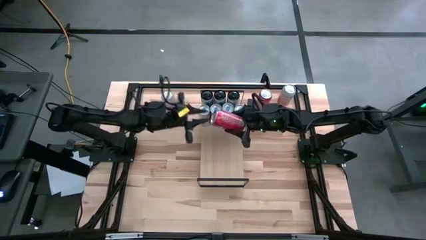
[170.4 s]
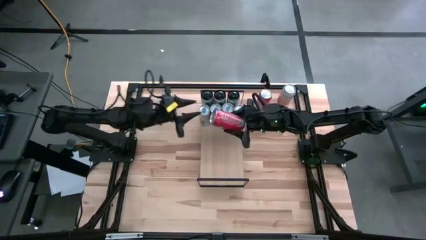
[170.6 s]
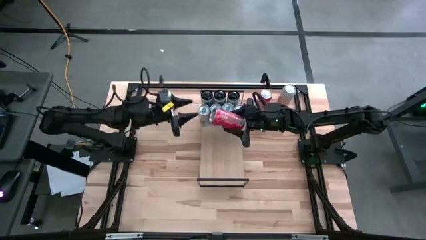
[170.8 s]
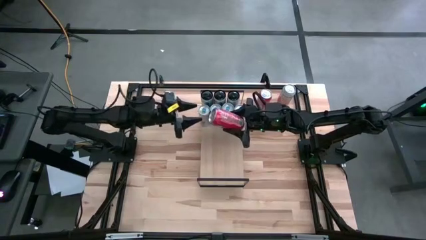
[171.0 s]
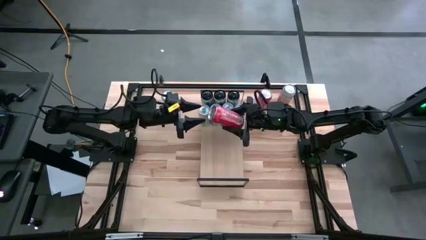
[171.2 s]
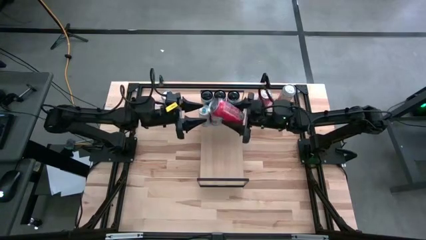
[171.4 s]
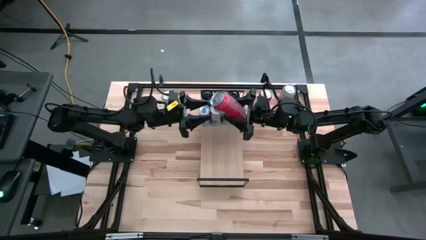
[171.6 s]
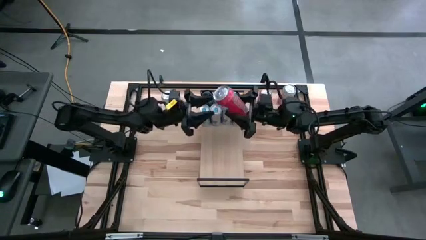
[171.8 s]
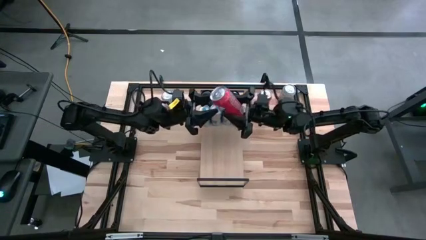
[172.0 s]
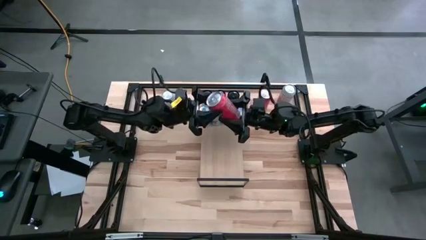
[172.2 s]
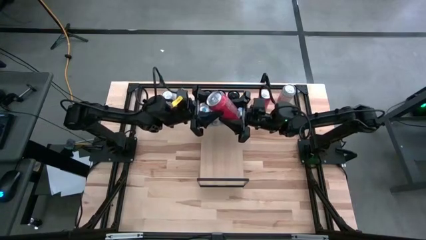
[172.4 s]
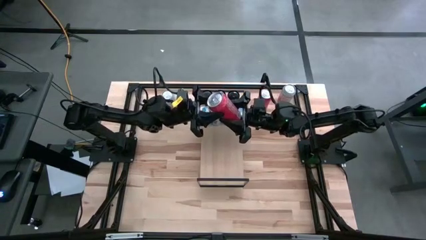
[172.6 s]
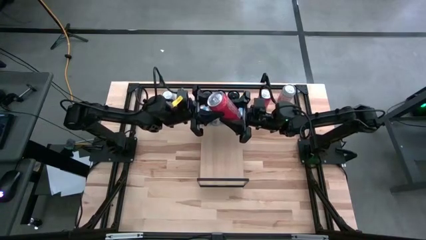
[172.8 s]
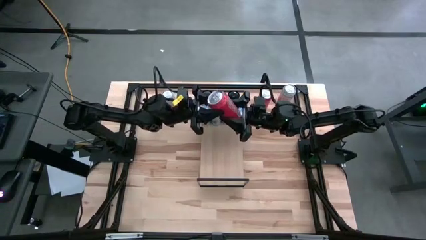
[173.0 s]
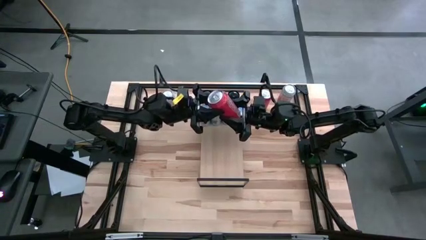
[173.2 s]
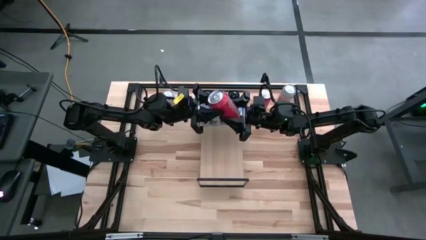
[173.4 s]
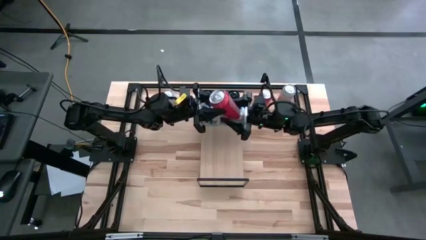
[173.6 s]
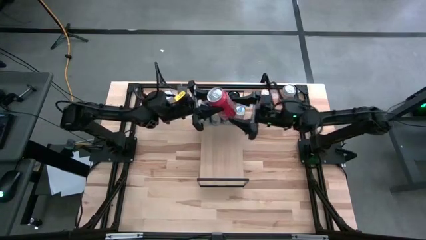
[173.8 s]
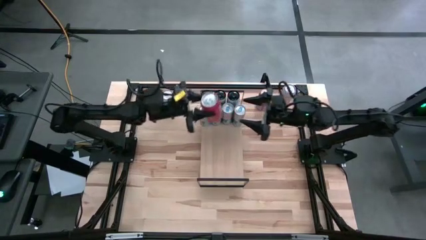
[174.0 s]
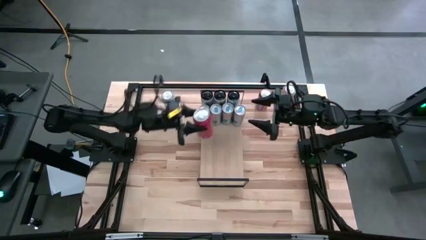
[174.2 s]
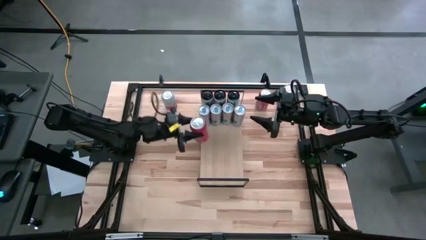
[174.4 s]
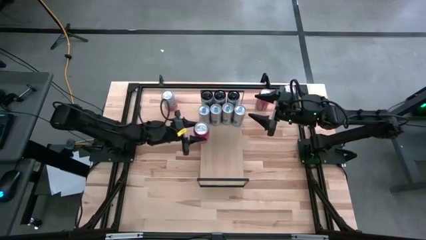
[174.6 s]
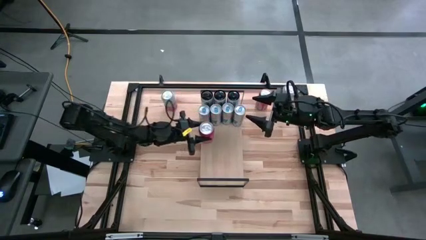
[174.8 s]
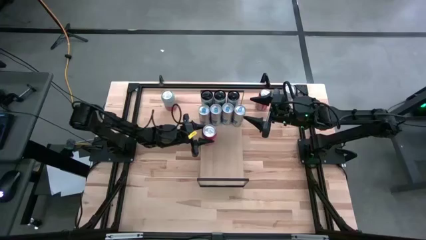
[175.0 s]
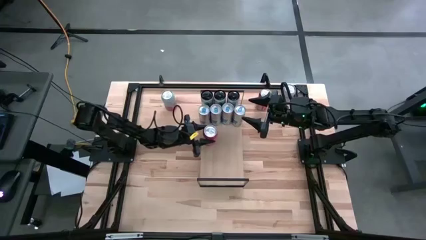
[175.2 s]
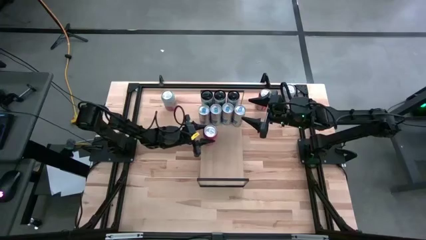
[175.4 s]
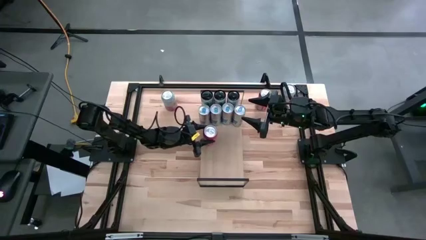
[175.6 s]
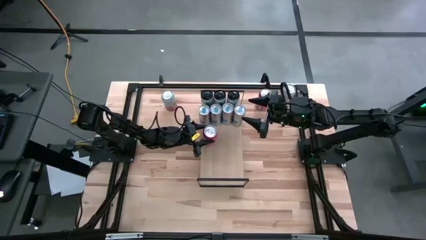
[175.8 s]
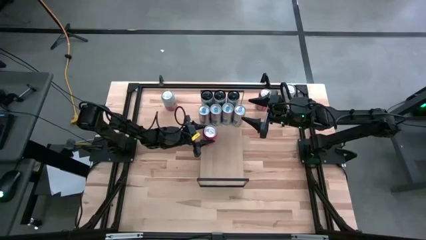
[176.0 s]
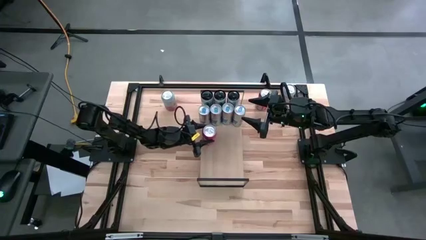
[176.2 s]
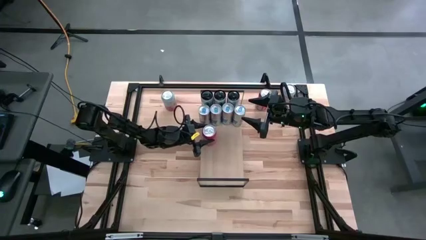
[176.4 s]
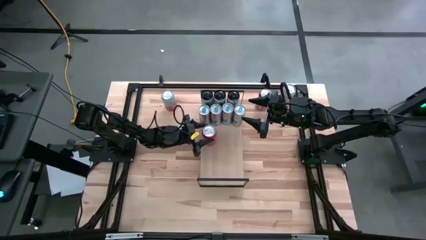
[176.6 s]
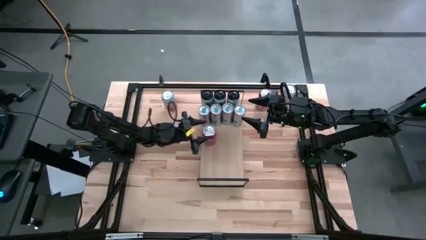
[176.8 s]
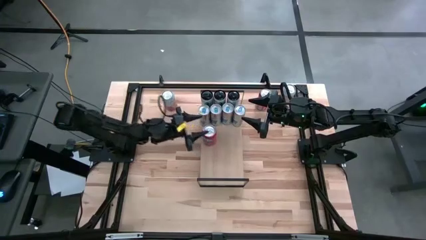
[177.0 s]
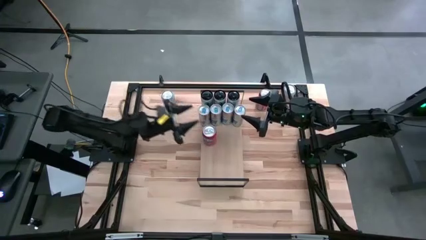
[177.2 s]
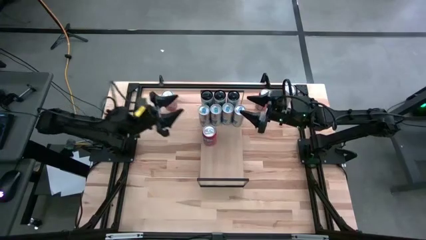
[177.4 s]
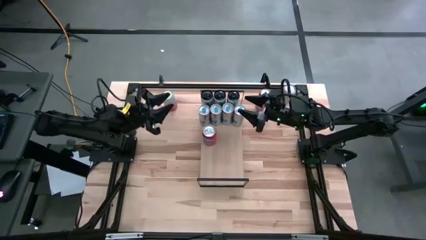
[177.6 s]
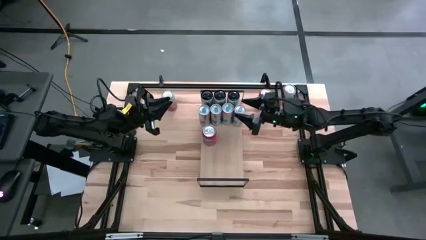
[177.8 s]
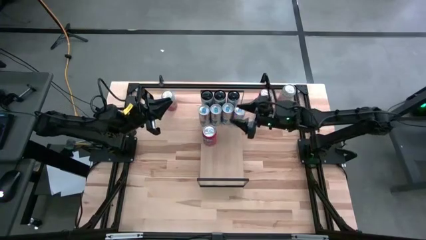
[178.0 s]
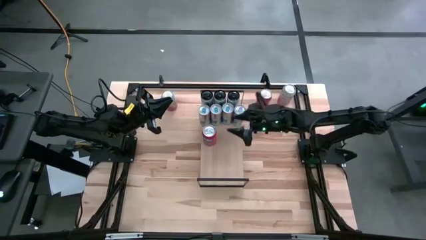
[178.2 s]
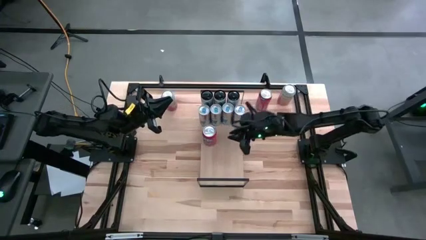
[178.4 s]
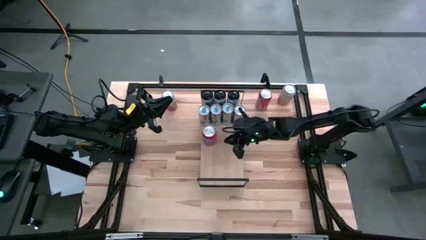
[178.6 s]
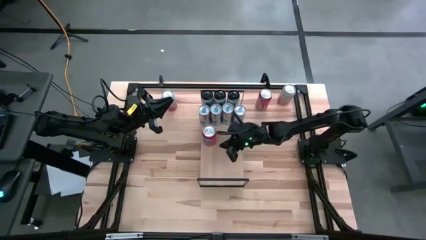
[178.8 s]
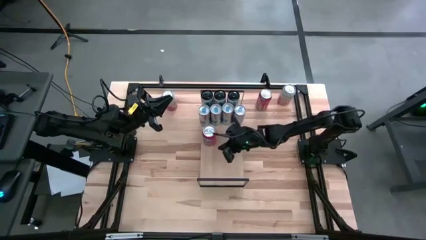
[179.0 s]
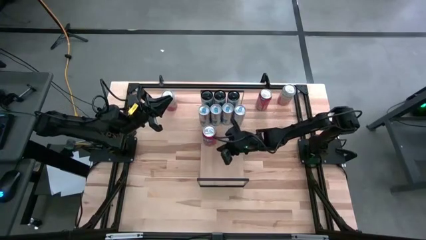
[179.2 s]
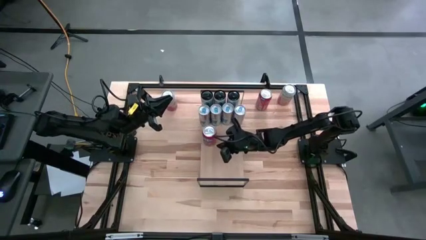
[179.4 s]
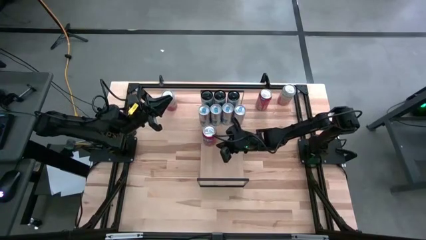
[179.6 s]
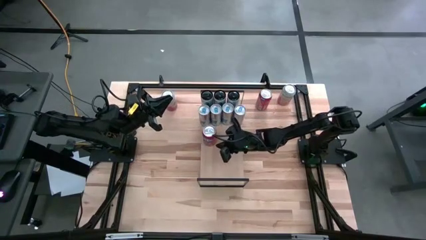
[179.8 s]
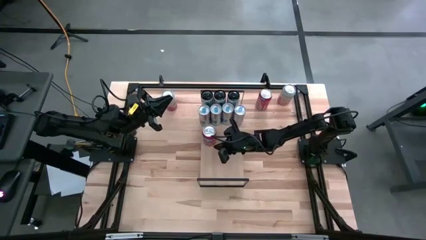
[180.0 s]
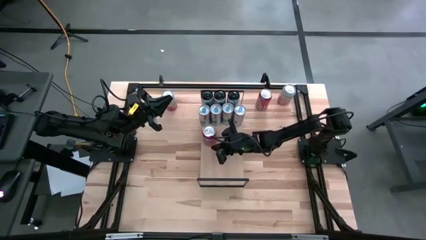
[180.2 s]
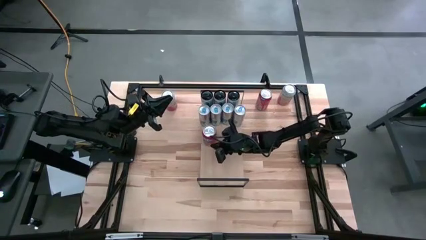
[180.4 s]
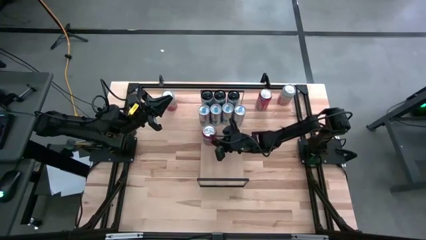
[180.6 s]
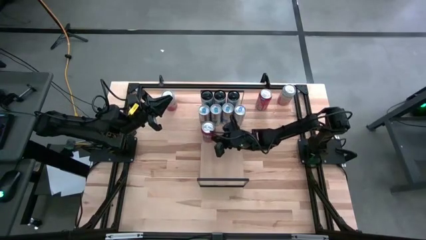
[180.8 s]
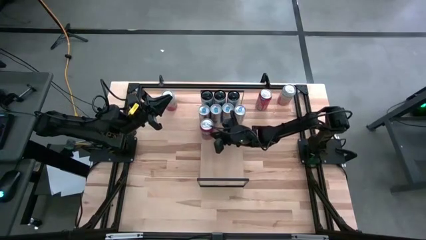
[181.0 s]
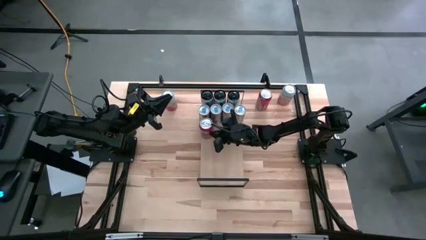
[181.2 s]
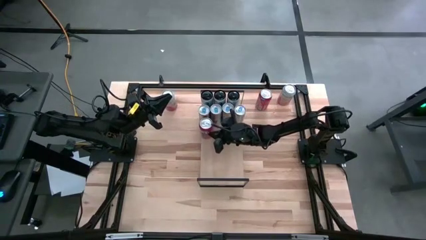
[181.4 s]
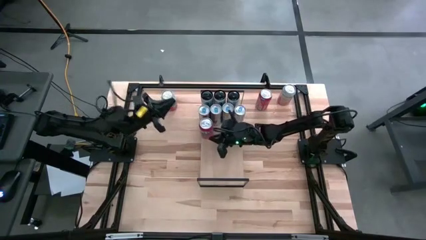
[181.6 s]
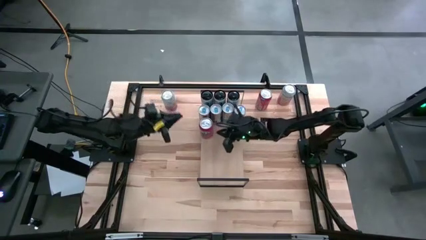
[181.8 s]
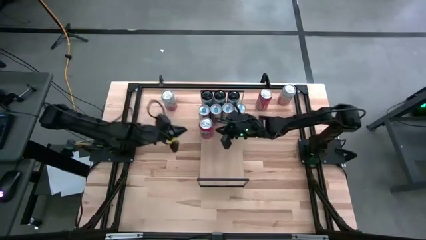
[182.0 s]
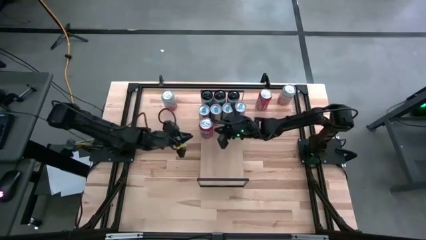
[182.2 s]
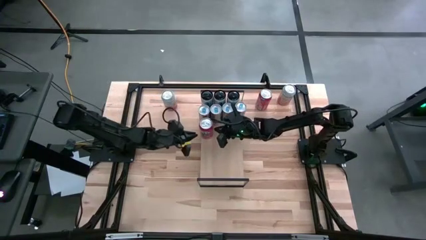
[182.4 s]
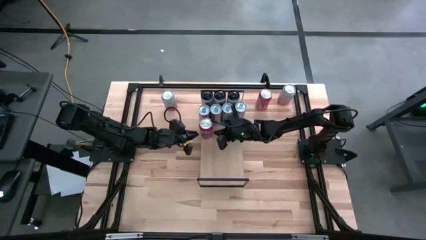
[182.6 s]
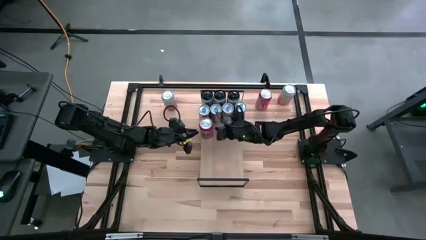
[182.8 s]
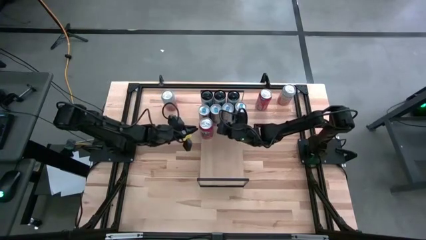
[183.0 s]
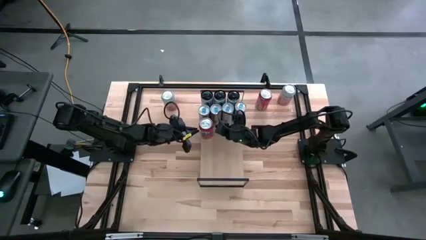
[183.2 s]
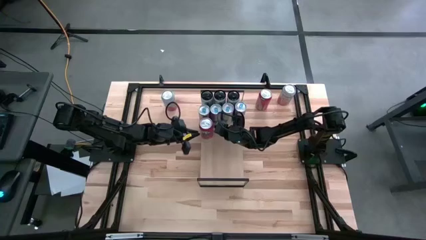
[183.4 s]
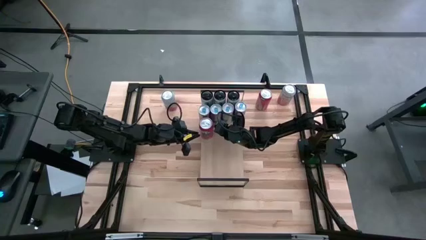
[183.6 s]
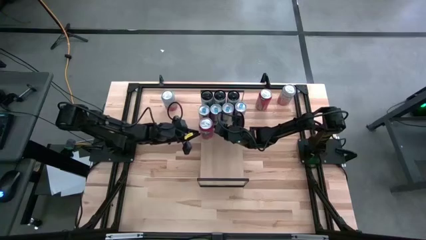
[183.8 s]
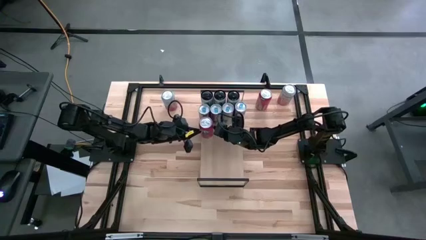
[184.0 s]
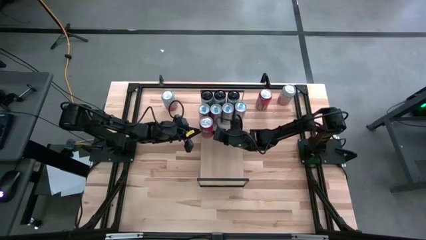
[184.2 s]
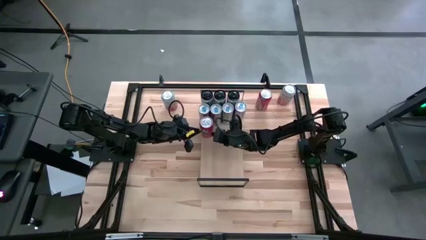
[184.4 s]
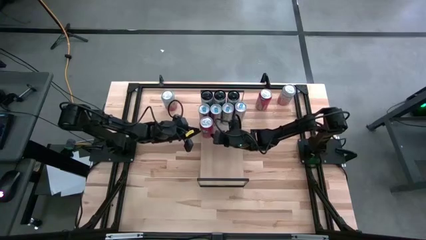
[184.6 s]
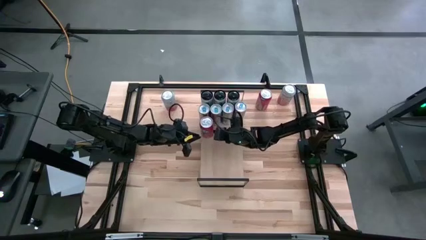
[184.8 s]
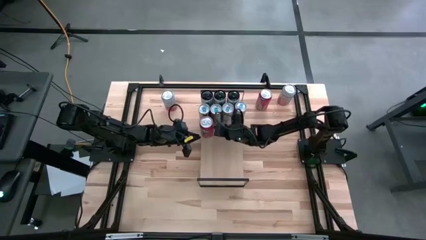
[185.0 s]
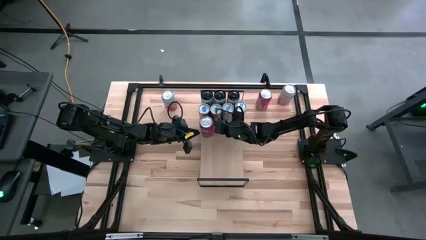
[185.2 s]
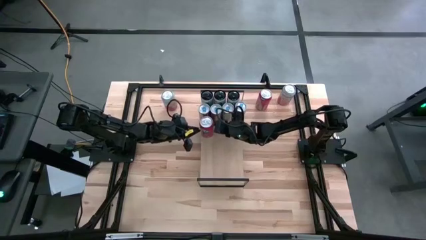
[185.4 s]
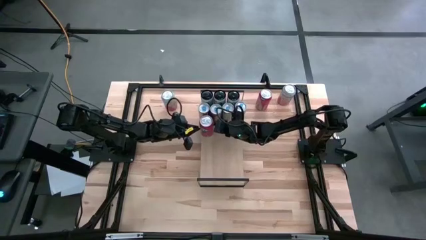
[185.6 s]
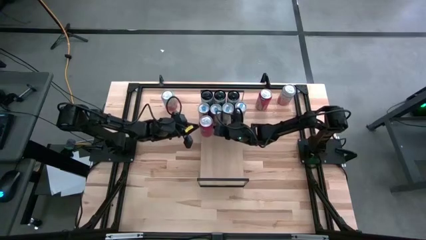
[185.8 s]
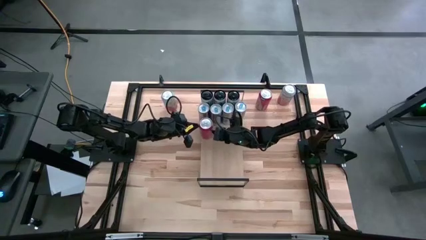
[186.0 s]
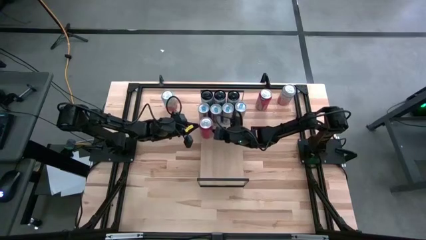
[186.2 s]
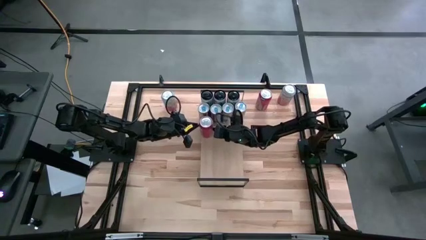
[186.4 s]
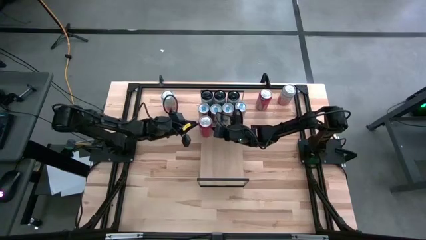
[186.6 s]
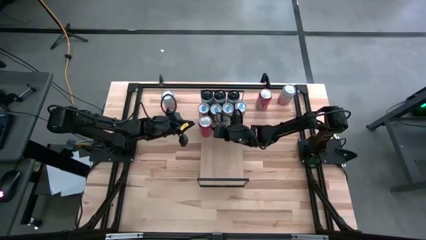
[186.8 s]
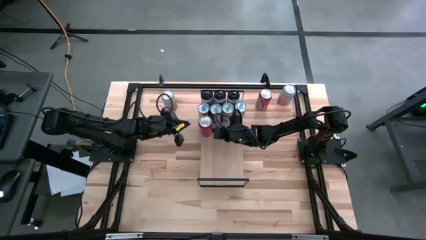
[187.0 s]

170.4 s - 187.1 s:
Task: Place canned beverage on shelf
Put the left red soda can on the shelf
